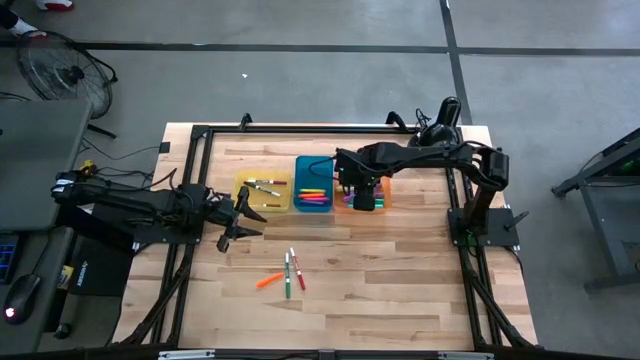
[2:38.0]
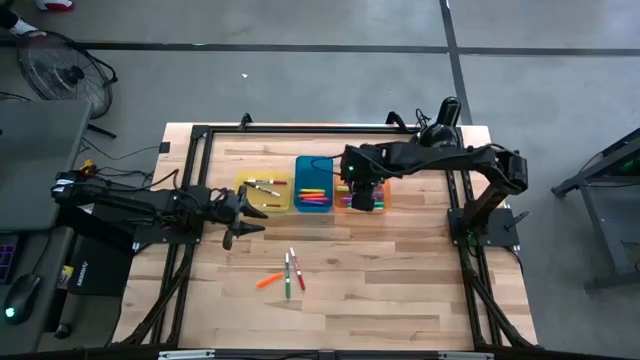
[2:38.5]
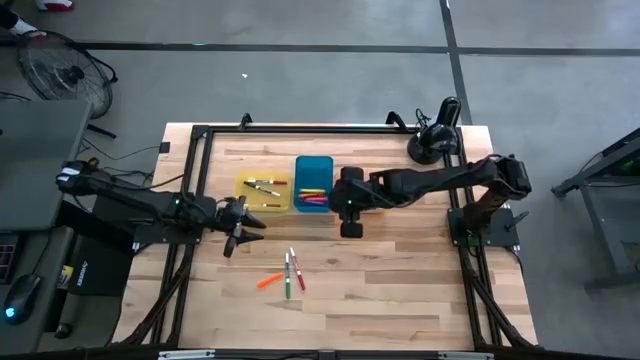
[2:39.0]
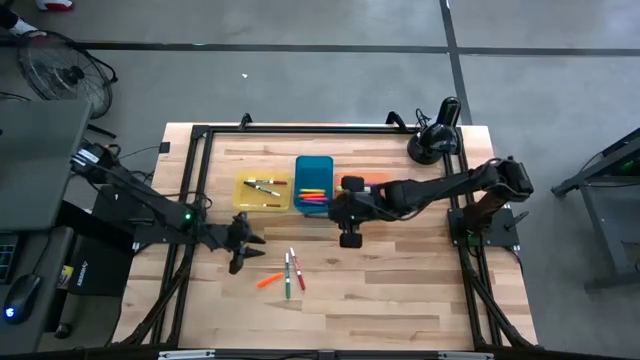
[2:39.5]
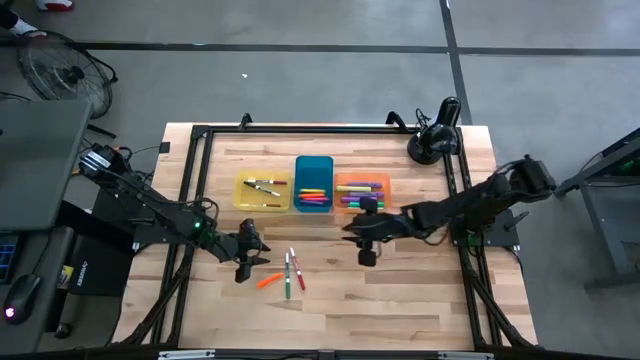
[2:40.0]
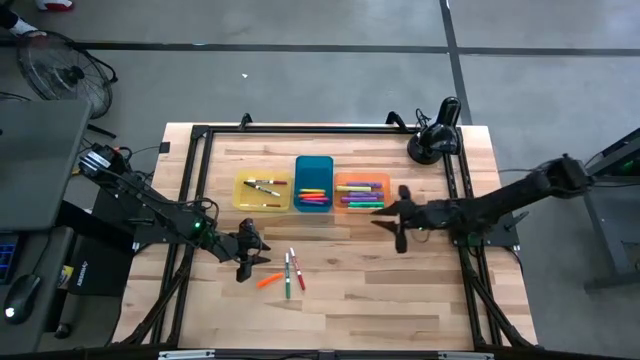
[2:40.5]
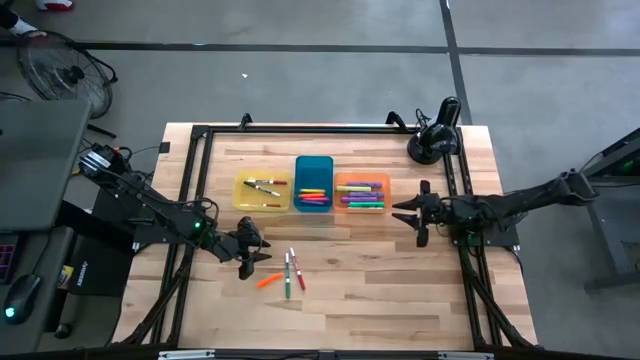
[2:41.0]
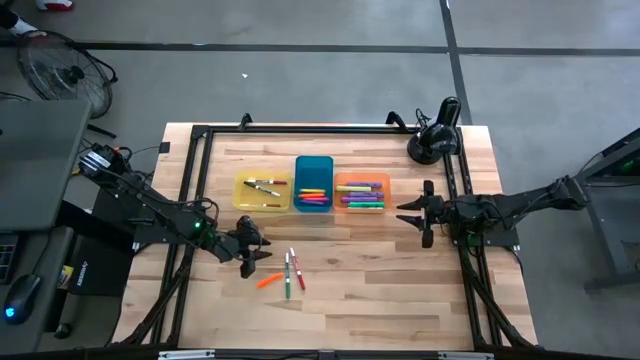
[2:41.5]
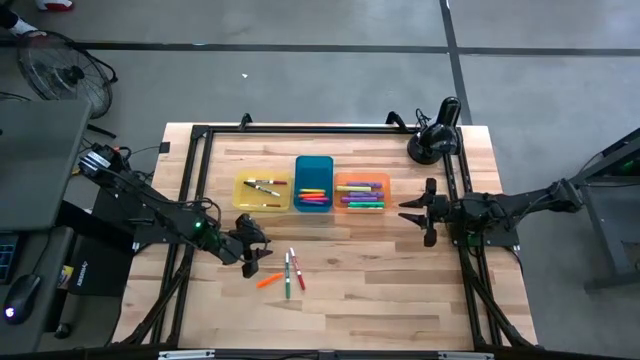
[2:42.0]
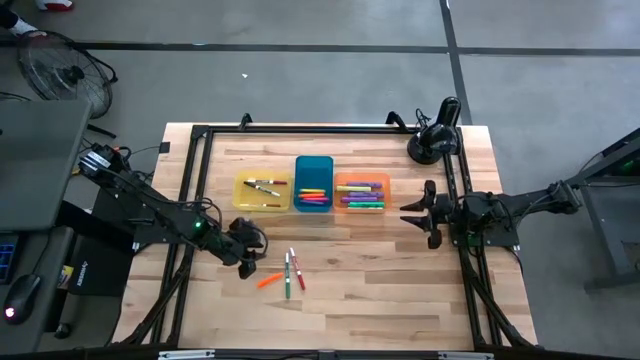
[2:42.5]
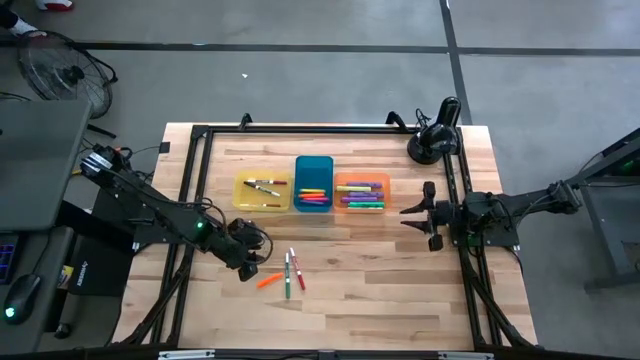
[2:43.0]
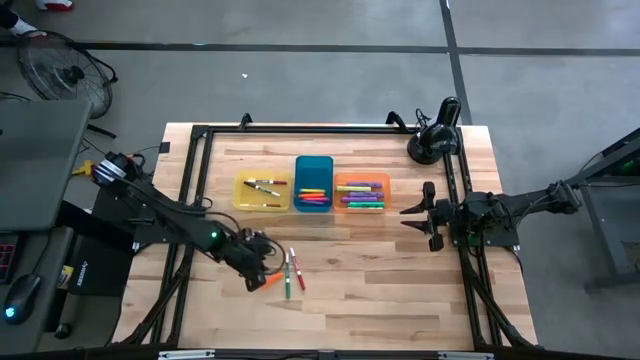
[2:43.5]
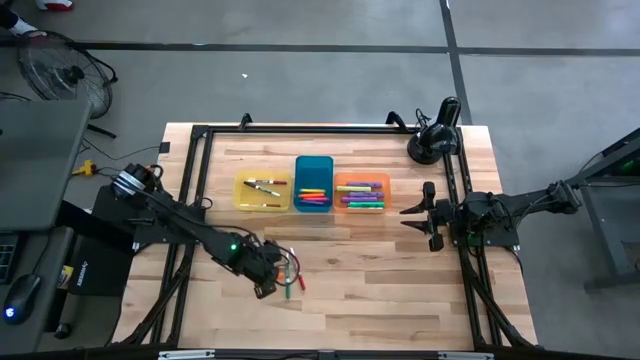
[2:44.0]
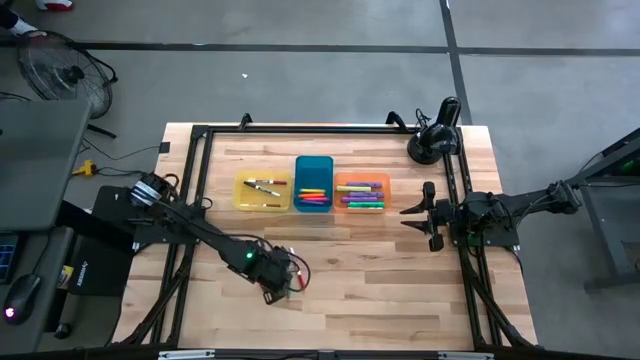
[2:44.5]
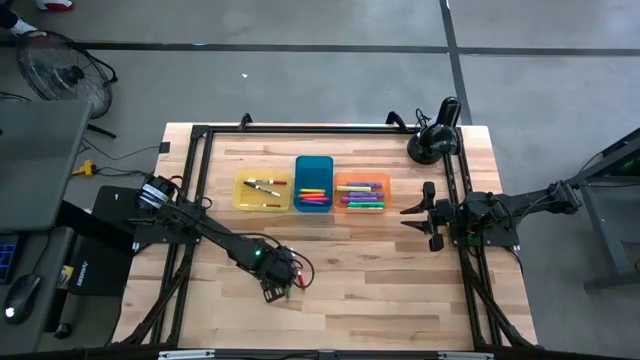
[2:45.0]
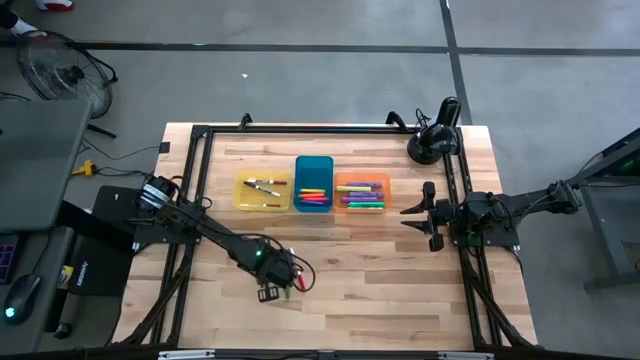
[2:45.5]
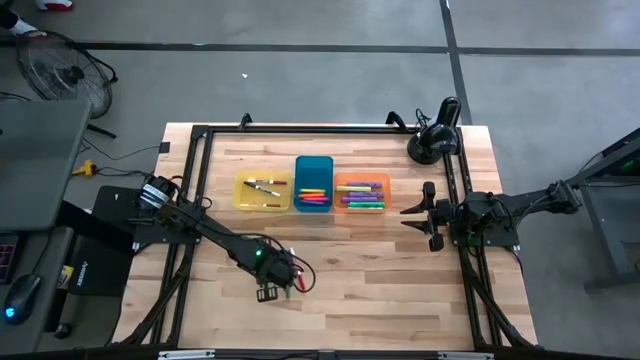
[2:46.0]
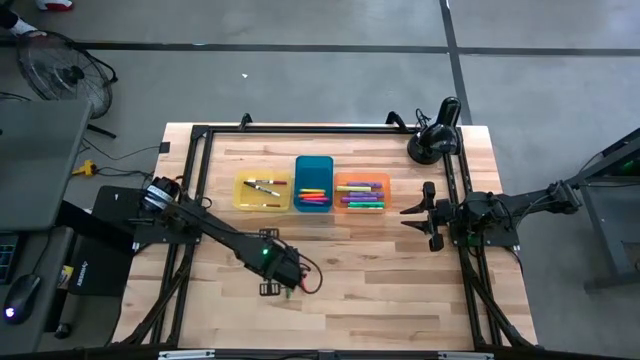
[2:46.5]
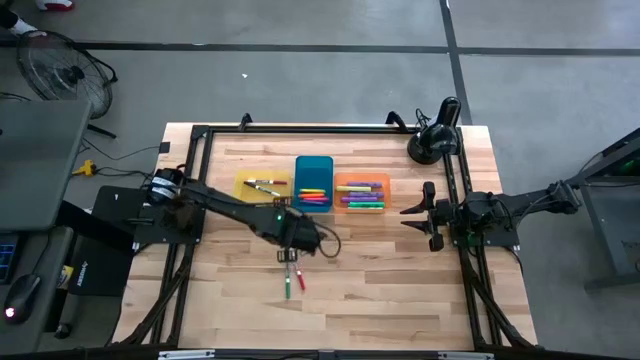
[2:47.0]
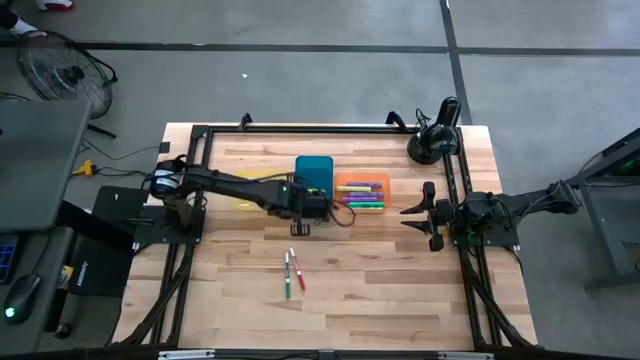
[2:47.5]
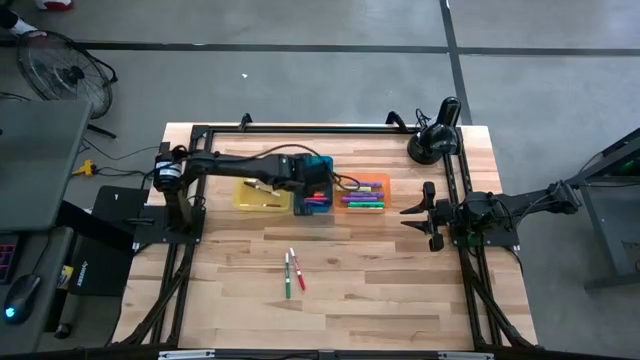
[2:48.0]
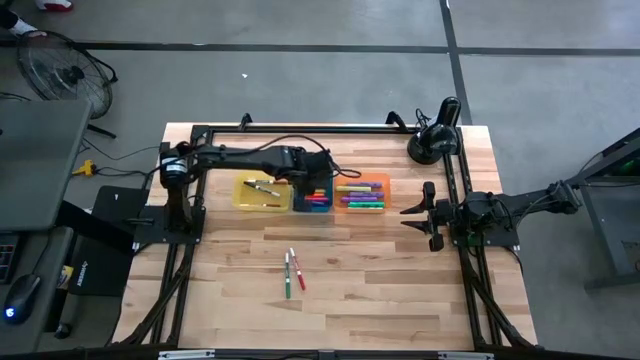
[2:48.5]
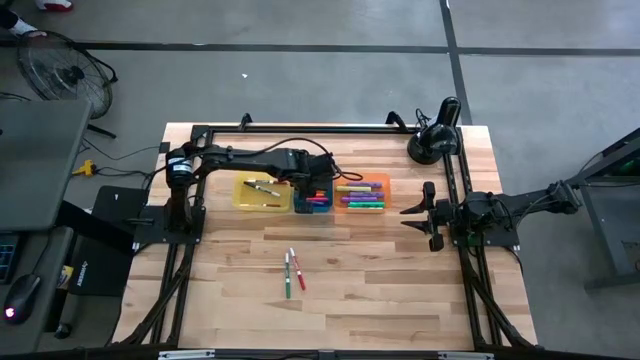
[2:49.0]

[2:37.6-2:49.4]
Task: Pick & Place Markers
Put the orange pen into the blue bin

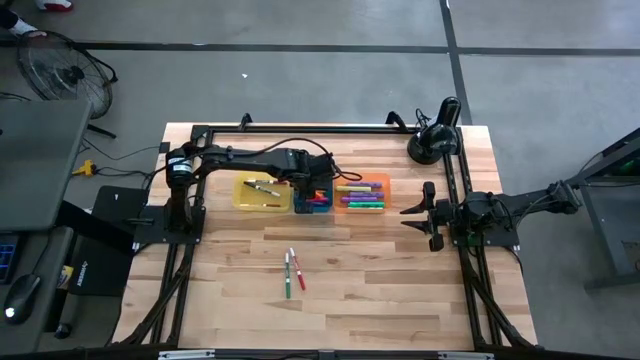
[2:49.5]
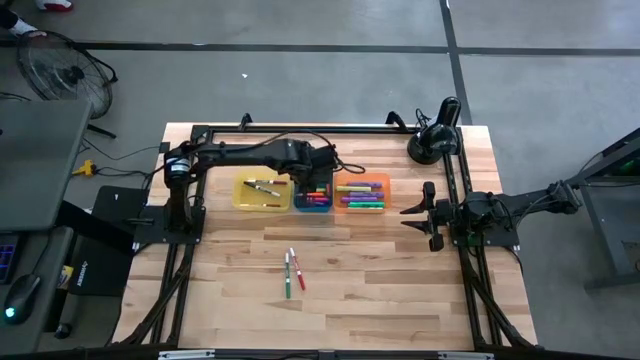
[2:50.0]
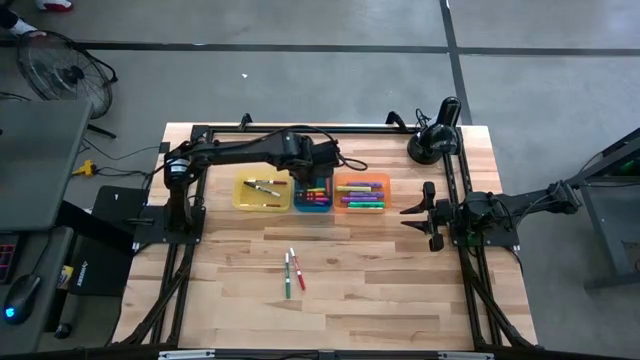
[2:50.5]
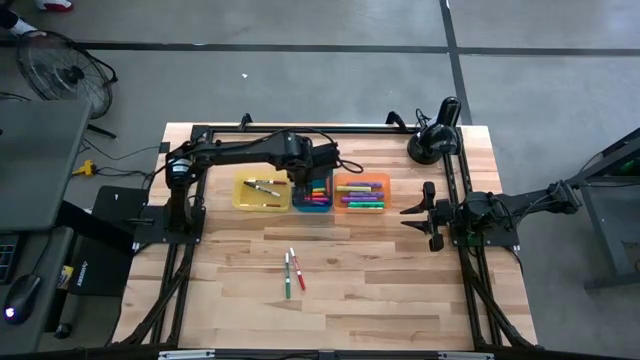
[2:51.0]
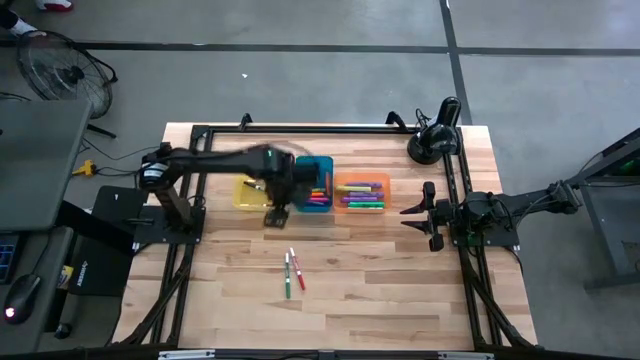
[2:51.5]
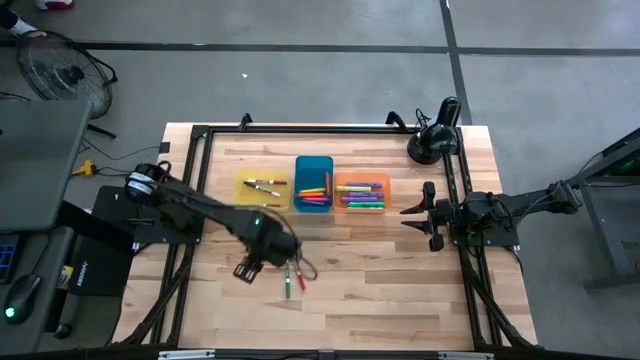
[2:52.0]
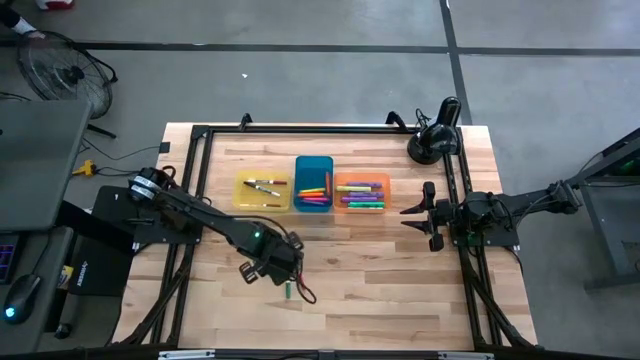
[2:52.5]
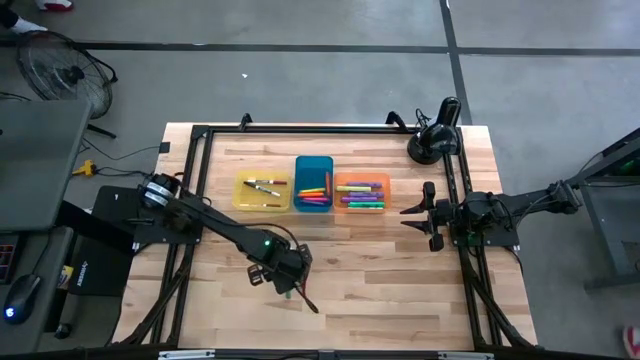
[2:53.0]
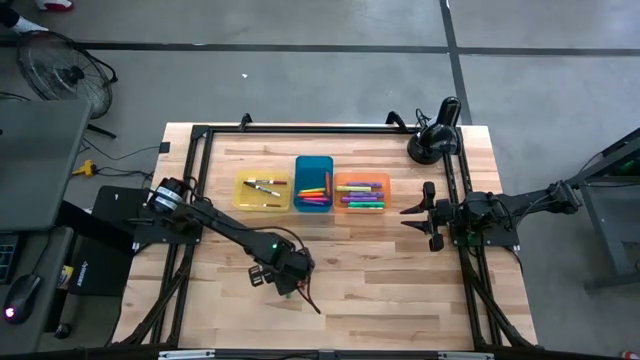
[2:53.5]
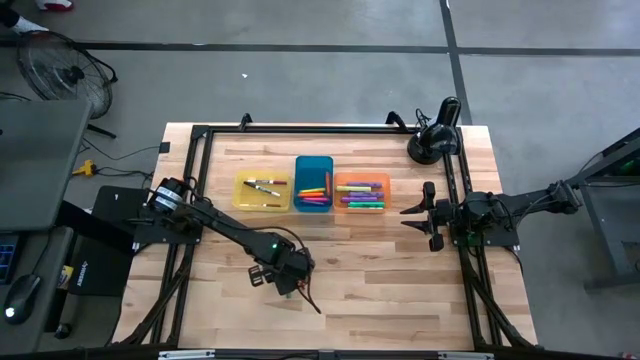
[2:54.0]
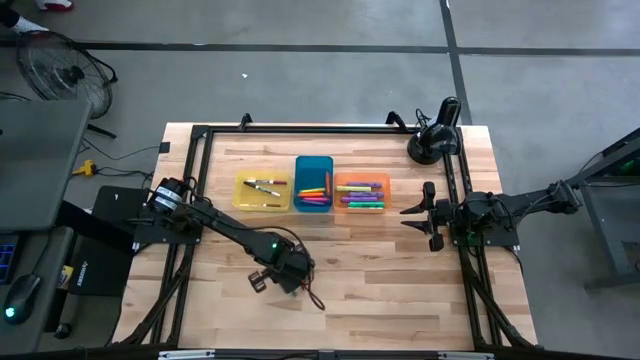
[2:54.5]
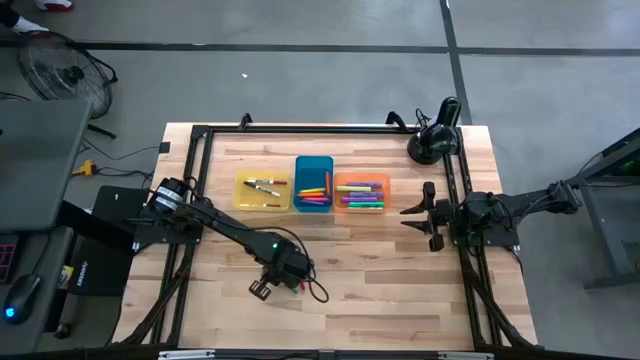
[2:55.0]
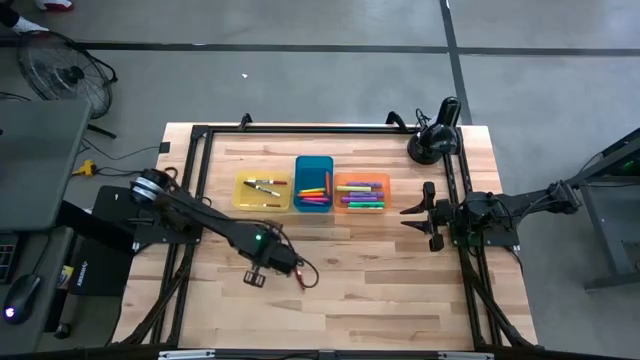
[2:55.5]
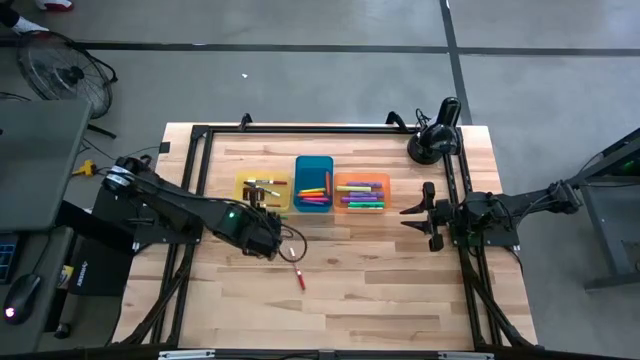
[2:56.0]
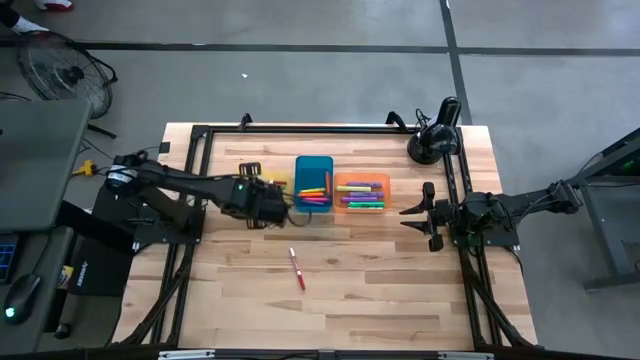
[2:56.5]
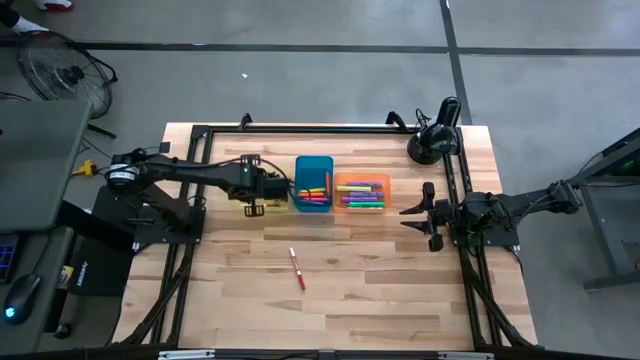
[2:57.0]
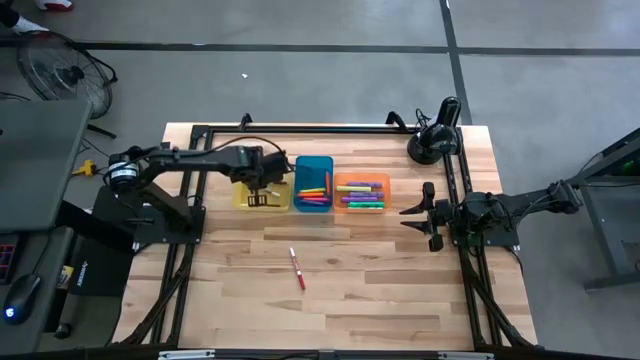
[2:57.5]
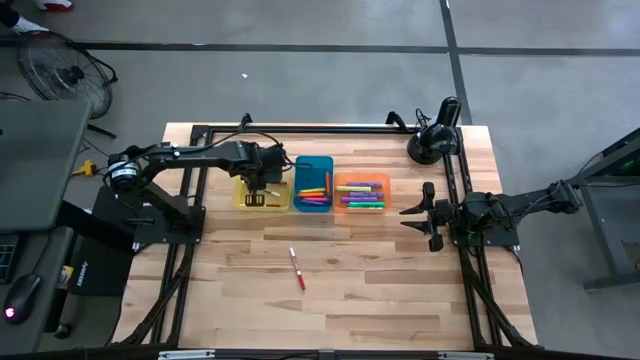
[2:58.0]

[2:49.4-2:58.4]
Put the green dry erase marker into the yellow bin

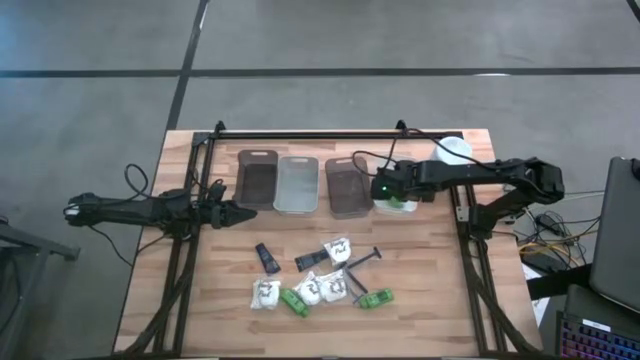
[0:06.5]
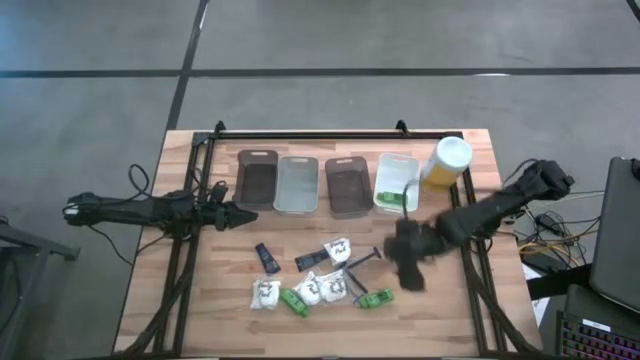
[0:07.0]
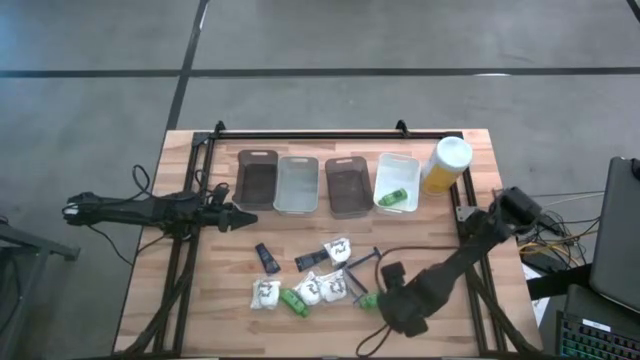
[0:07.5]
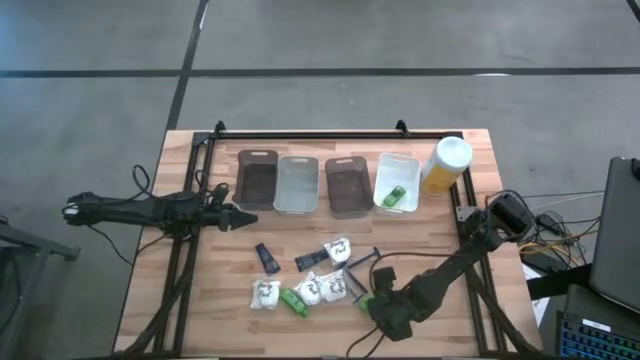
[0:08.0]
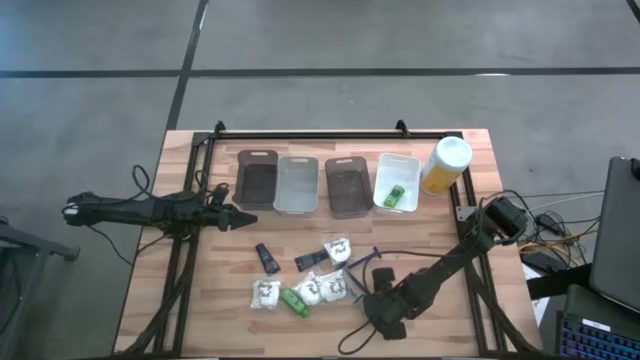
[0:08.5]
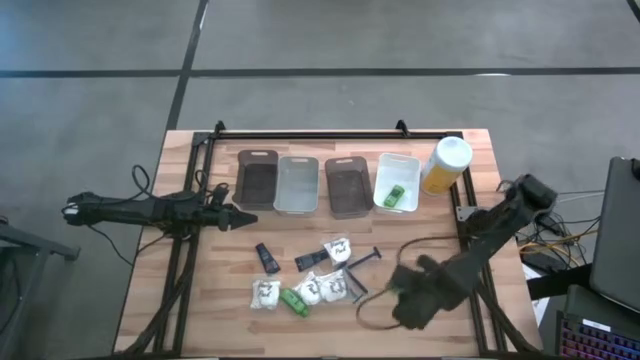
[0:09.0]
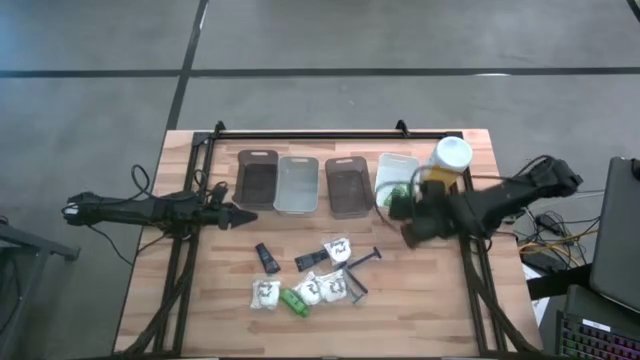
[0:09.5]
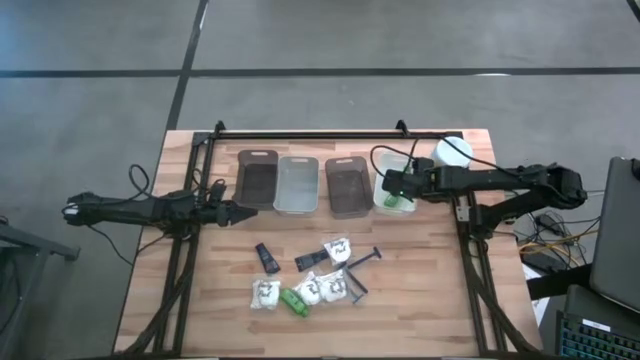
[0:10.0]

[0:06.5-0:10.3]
Task: Pick & Place Travel size toiletries
Put the green shampoo into the white bin
